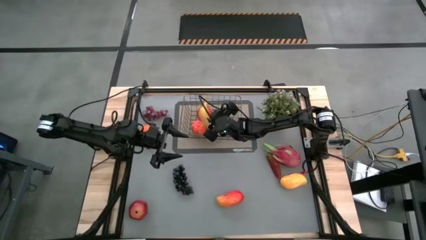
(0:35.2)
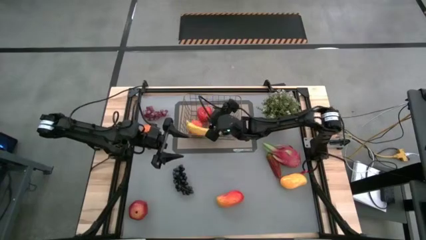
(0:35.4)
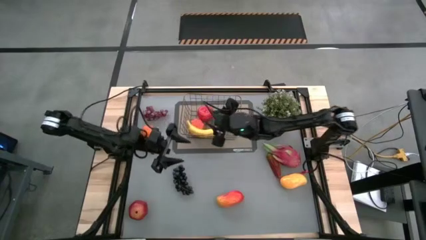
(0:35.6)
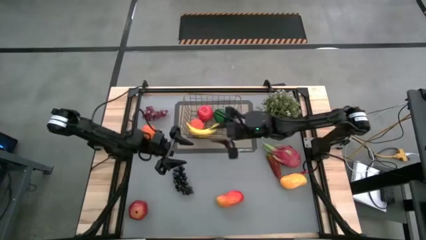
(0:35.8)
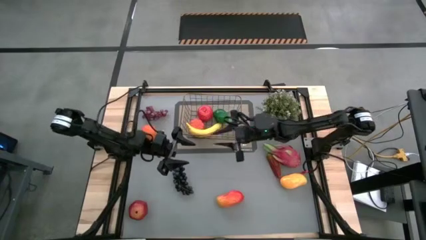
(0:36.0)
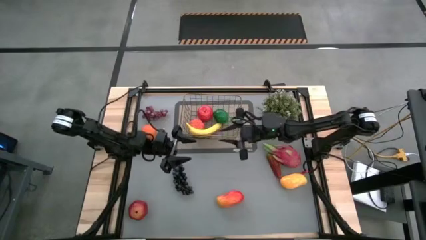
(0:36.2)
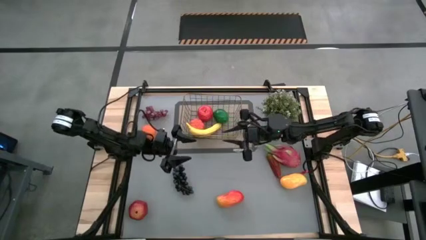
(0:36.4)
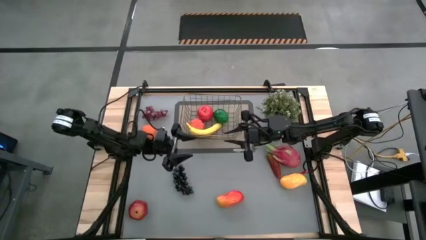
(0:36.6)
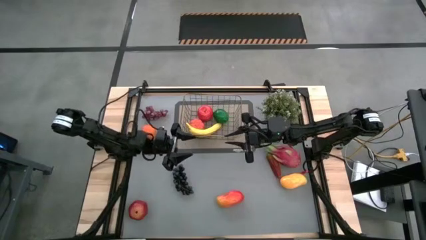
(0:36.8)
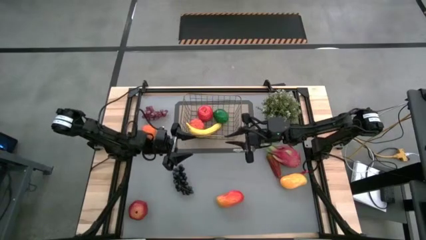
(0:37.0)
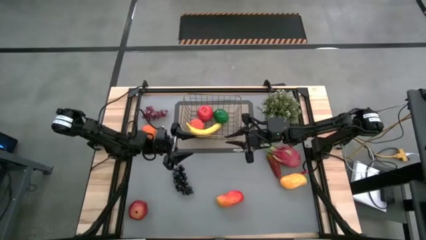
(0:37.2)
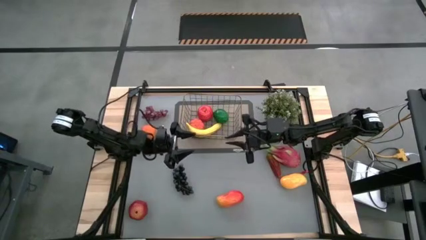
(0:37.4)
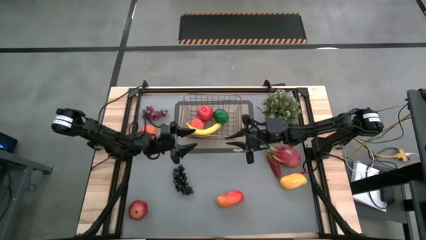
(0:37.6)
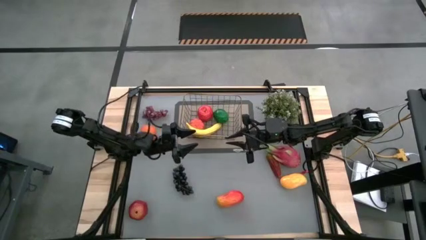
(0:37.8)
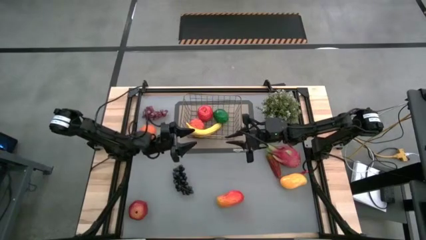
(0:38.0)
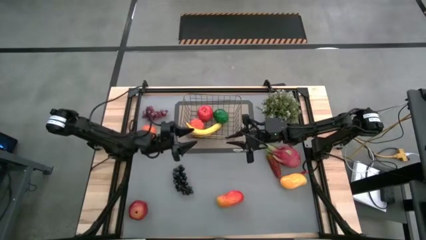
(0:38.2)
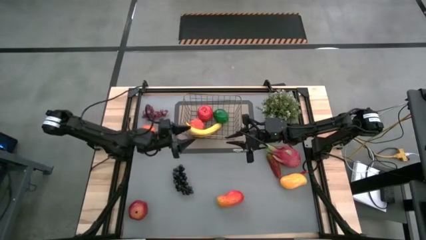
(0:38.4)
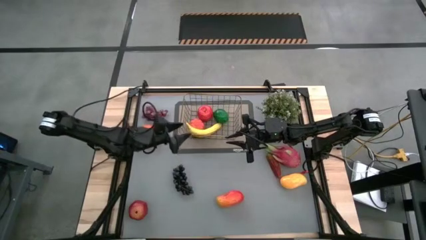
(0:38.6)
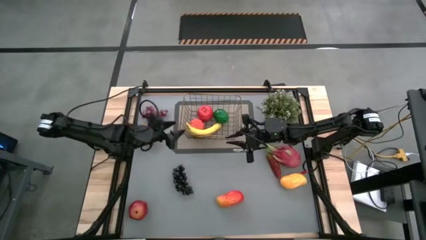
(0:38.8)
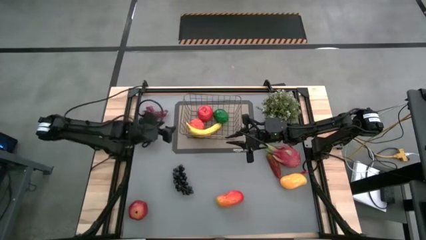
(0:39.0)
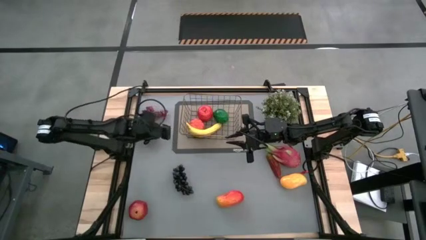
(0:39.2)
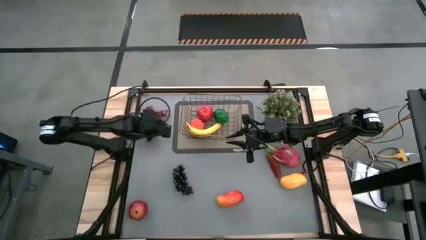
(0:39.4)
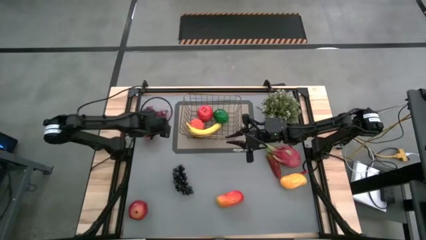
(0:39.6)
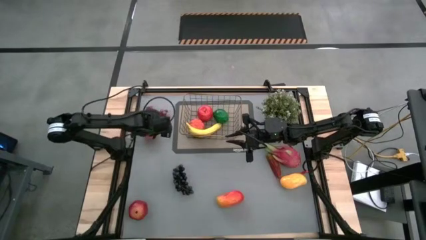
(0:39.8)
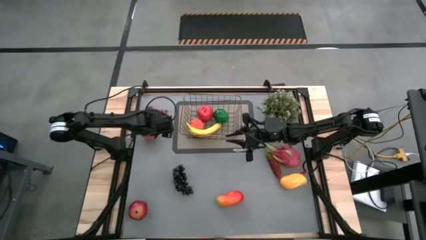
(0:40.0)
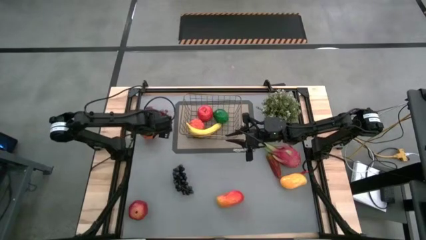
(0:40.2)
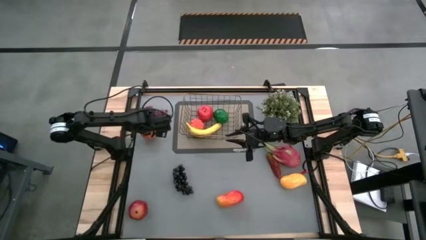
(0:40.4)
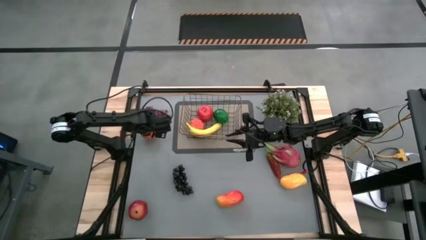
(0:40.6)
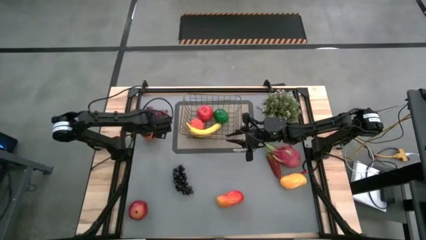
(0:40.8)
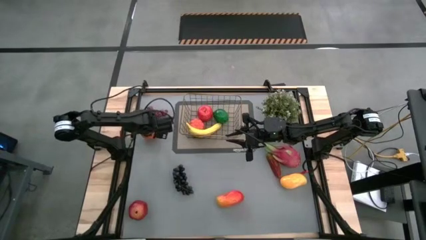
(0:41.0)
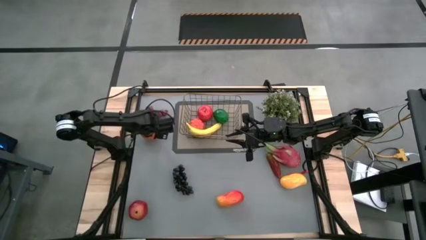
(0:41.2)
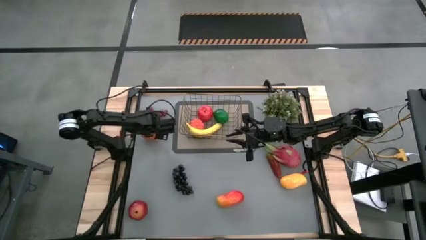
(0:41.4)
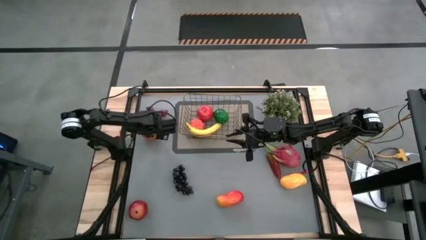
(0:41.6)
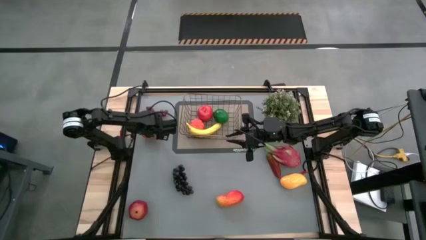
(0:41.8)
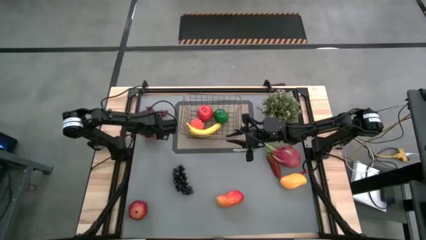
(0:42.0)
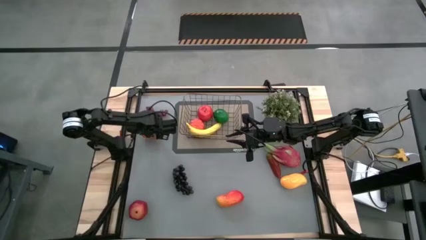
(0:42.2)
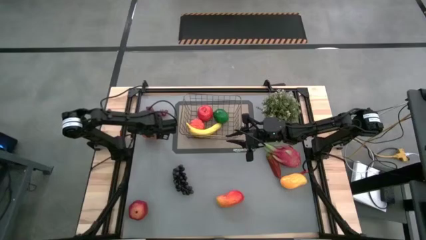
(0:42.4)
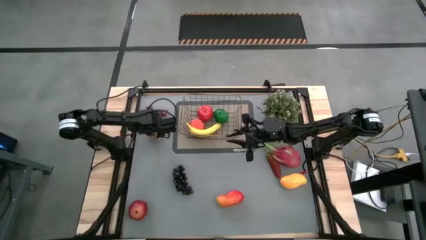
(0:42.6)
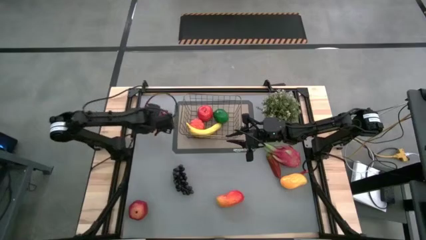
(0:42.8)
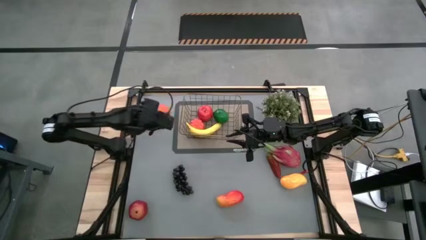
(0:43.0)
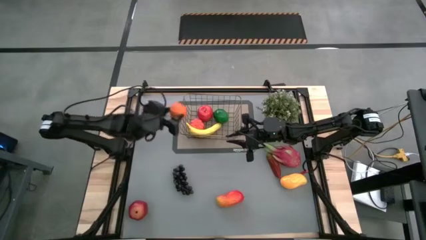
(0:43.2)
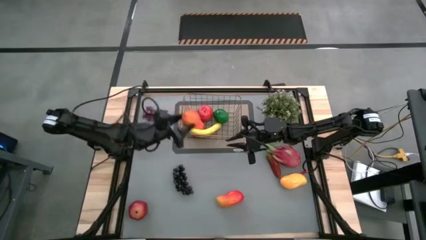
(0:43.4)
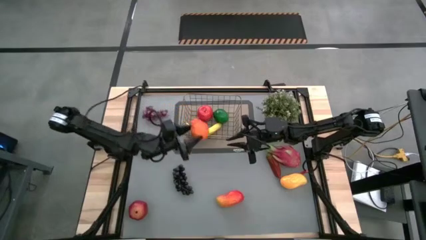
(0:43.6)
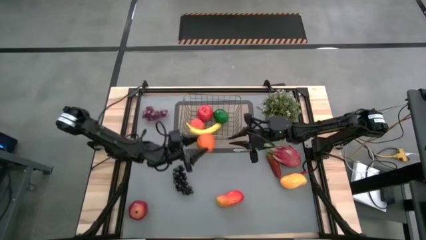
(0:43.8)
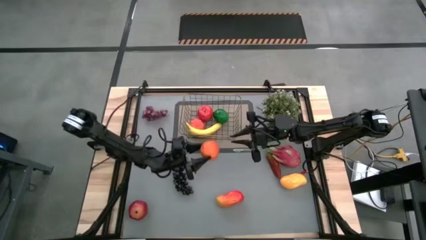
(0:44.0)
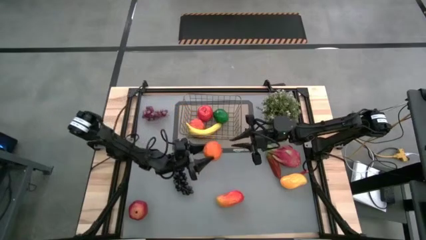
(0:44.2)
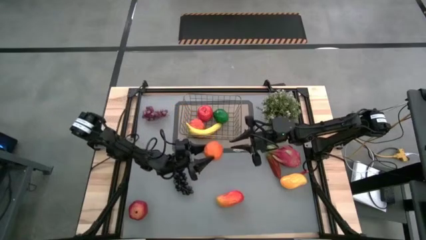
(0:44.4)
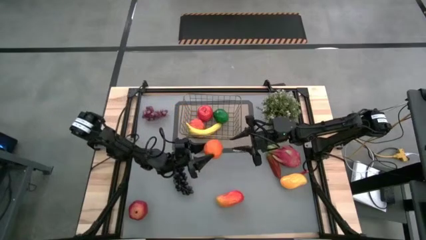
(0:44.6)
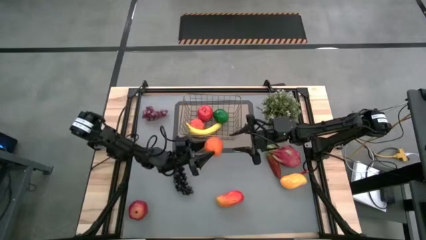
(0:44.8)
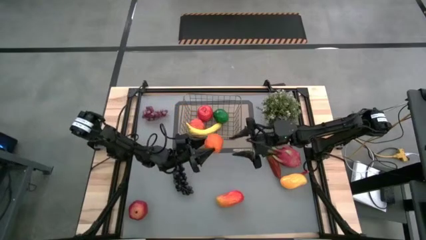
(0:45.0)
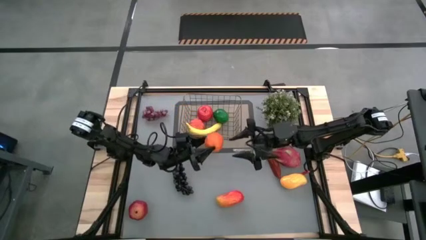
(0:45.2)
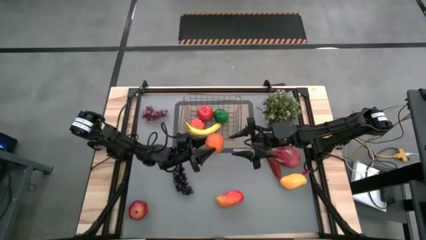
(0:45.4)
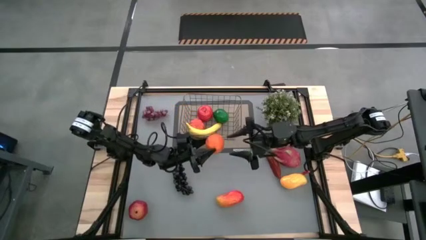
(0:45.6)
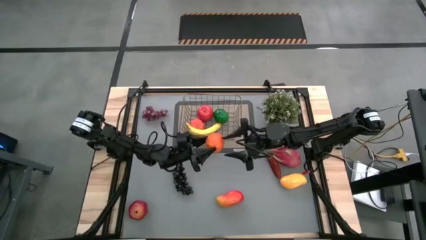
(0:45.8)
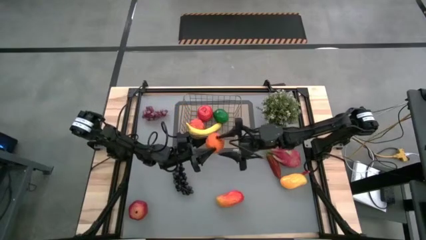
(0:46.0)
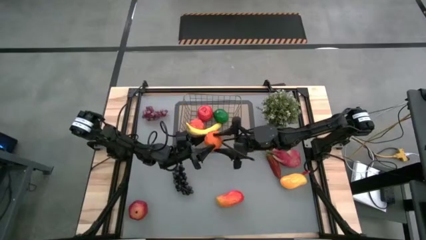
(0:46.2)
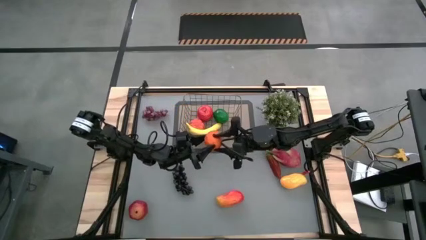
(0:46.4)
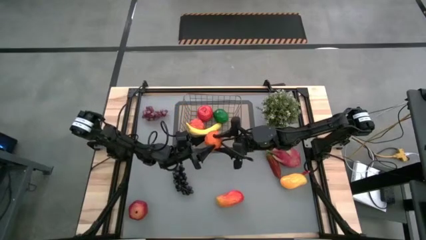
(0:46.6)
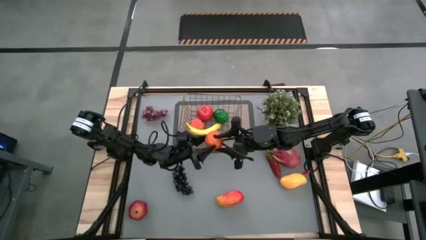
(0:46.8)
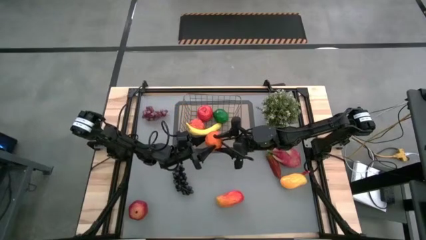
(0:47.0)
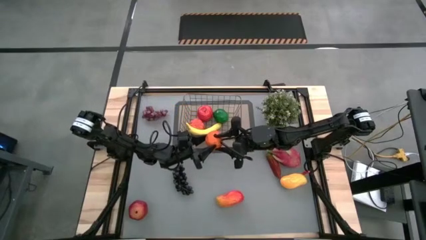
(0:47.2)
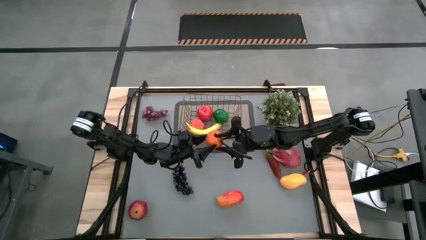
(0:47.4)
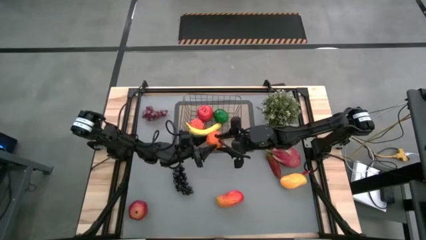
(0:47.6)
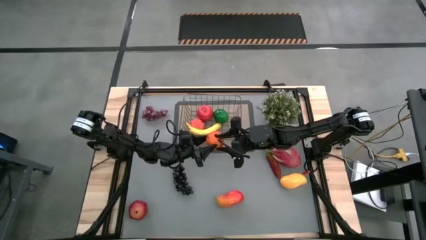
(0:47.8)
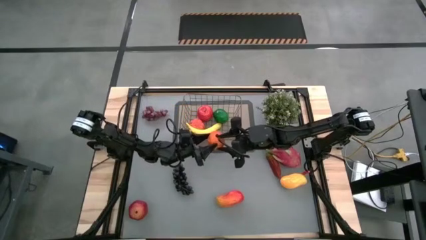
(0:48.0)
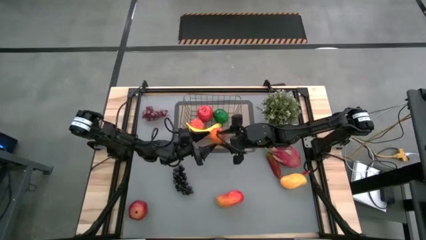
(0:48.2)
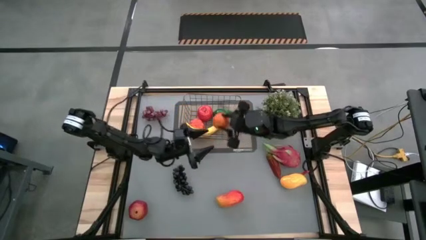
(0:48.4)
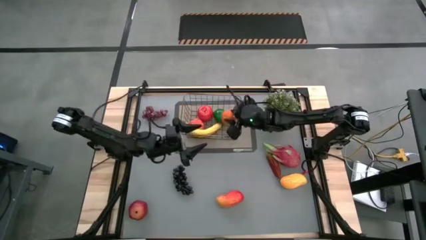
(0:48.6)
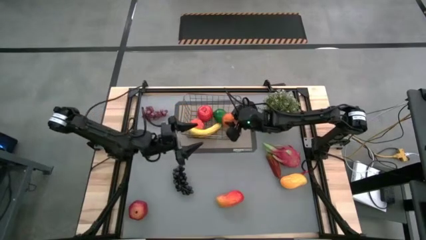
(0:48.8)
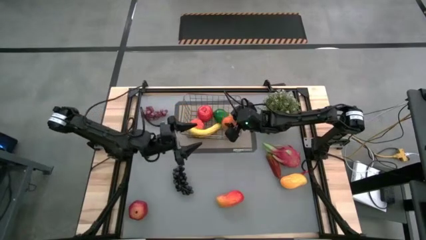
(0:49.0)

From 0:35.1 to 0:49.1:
Task: Build produce basket
Put the orange into the wire basket
